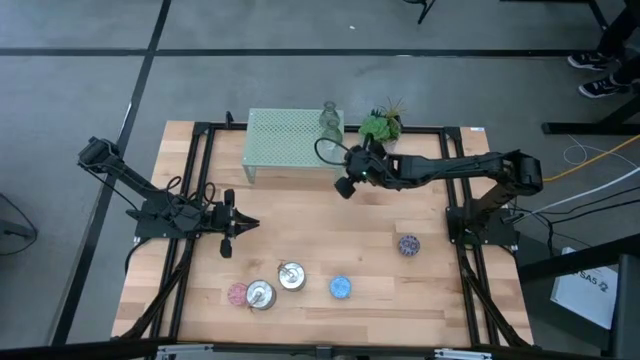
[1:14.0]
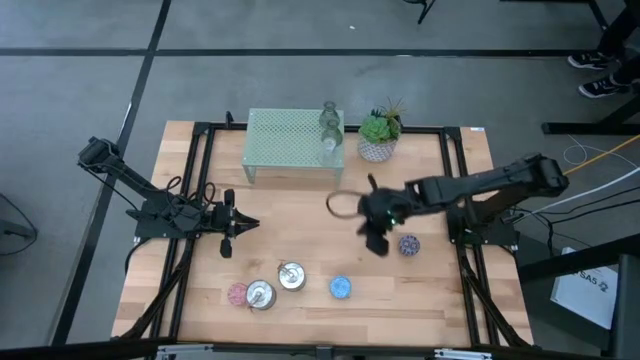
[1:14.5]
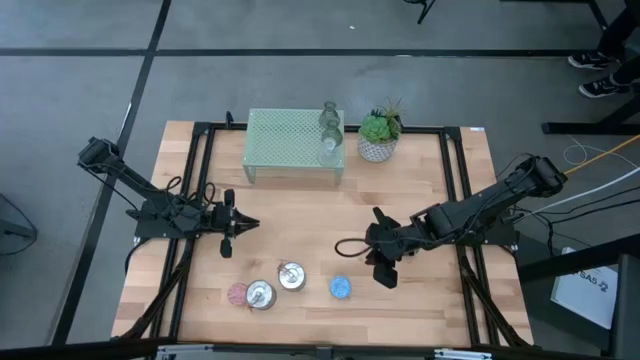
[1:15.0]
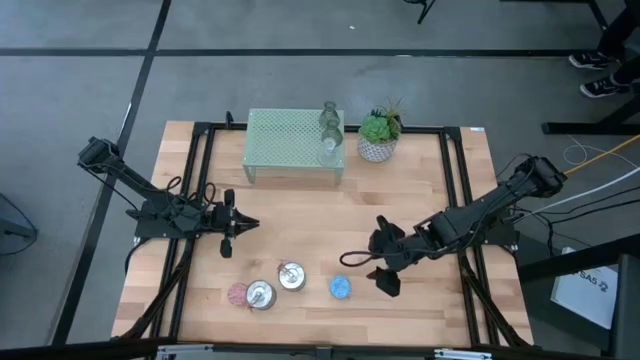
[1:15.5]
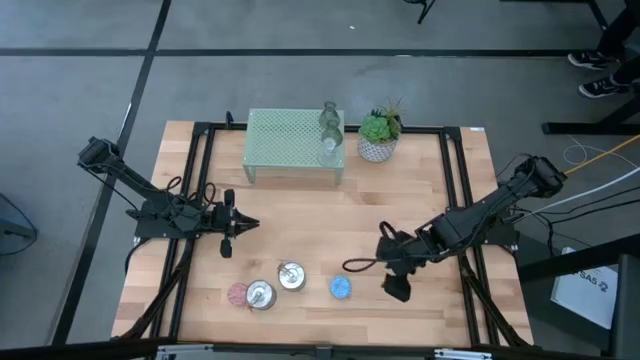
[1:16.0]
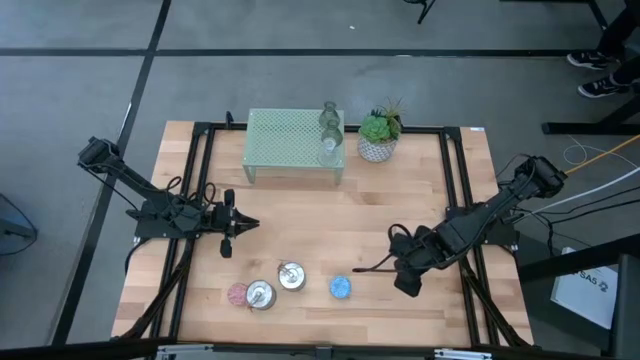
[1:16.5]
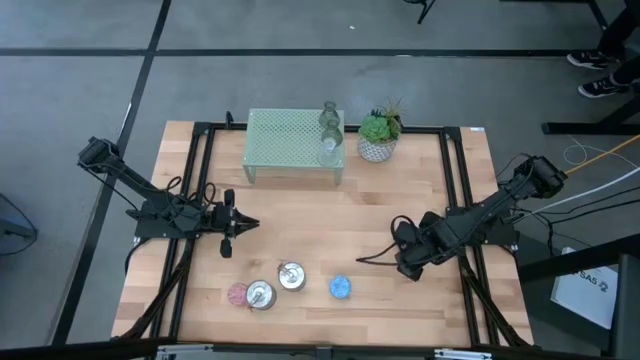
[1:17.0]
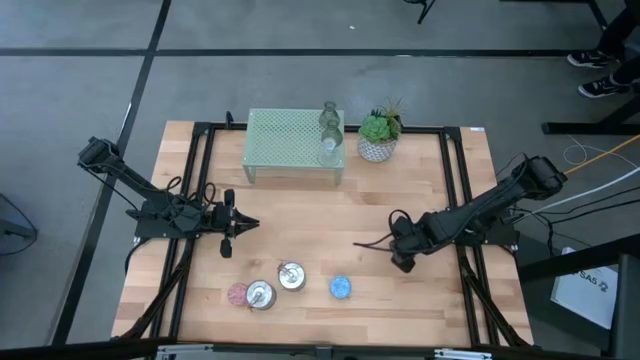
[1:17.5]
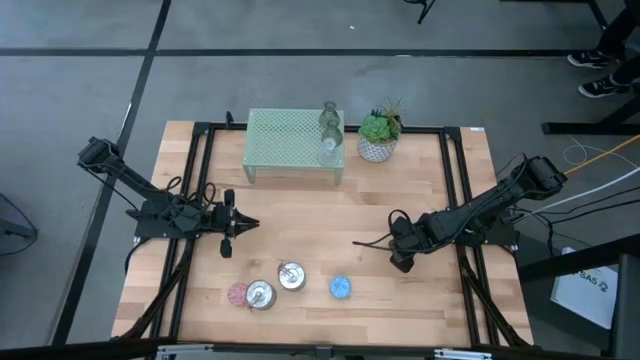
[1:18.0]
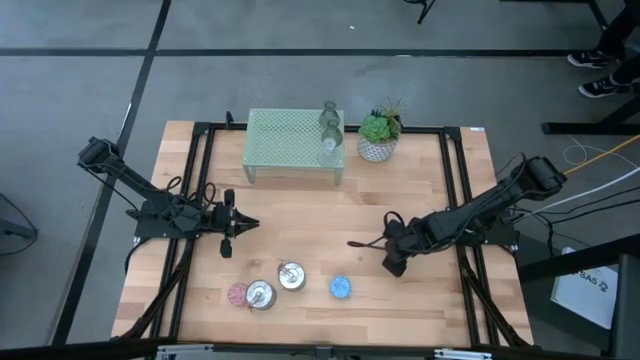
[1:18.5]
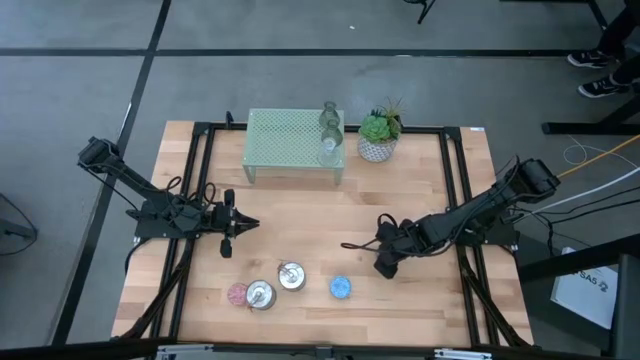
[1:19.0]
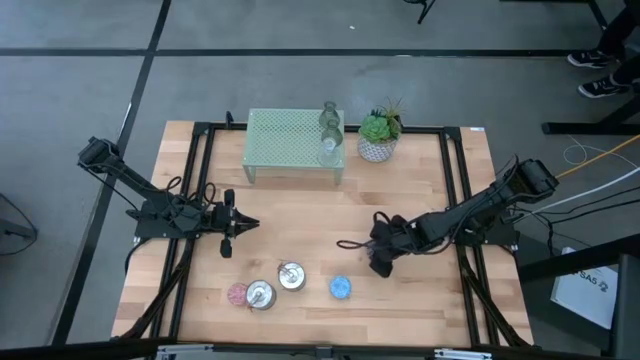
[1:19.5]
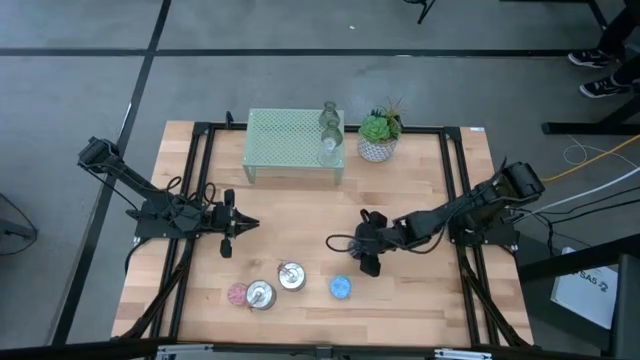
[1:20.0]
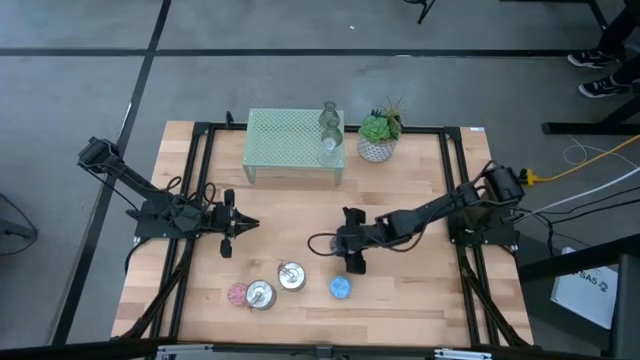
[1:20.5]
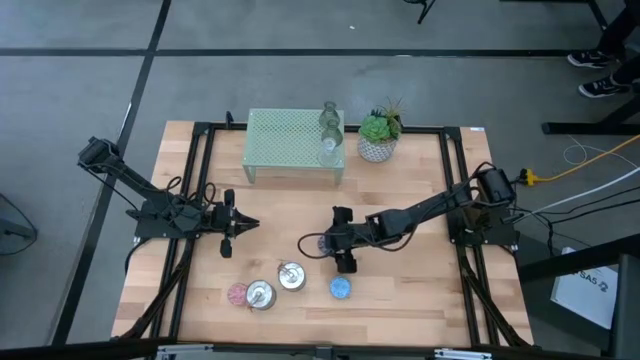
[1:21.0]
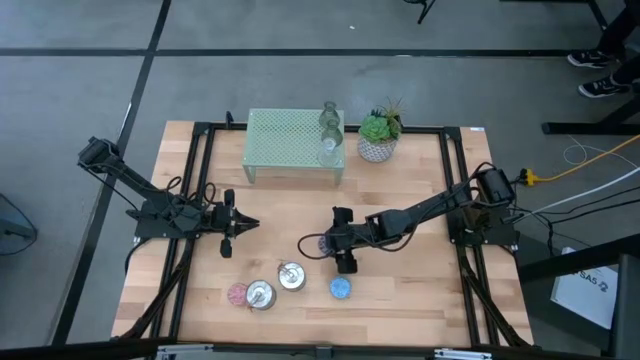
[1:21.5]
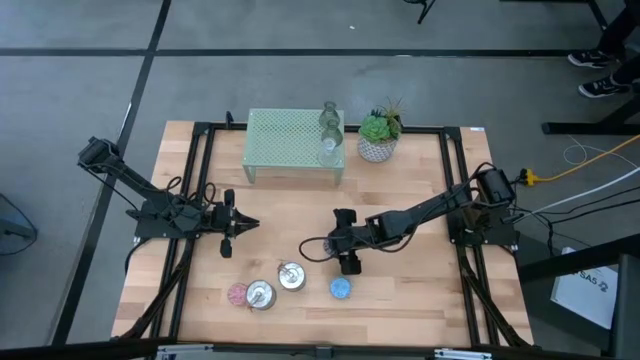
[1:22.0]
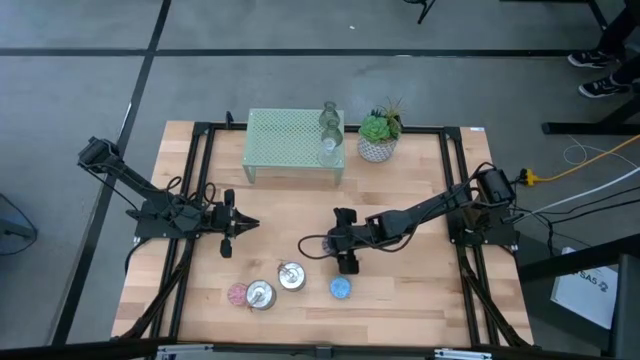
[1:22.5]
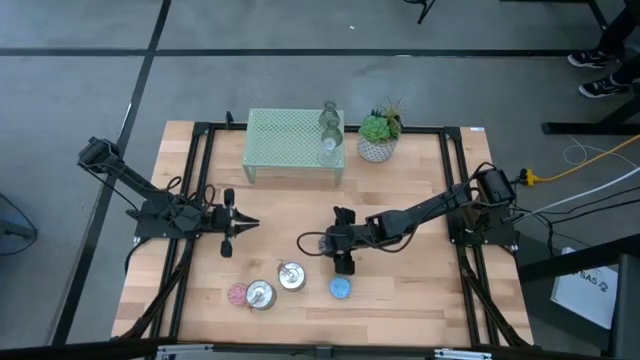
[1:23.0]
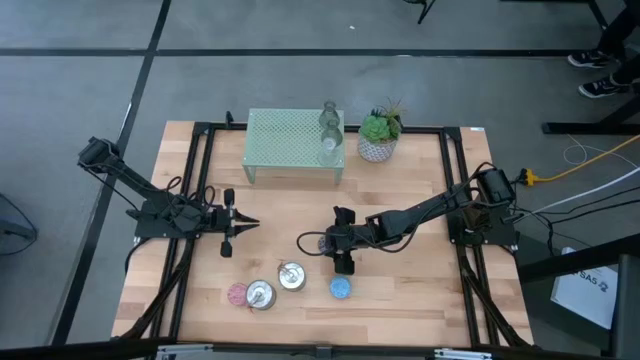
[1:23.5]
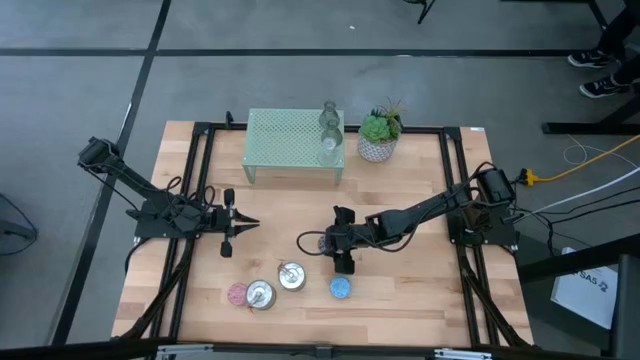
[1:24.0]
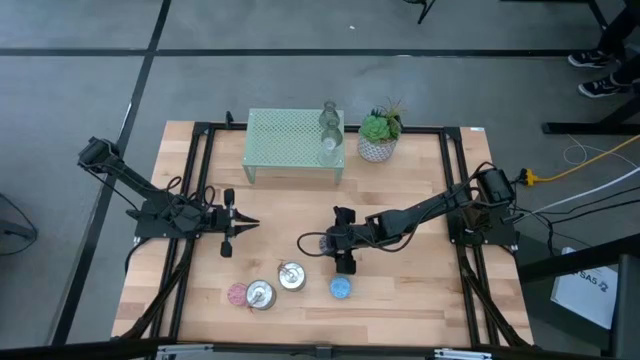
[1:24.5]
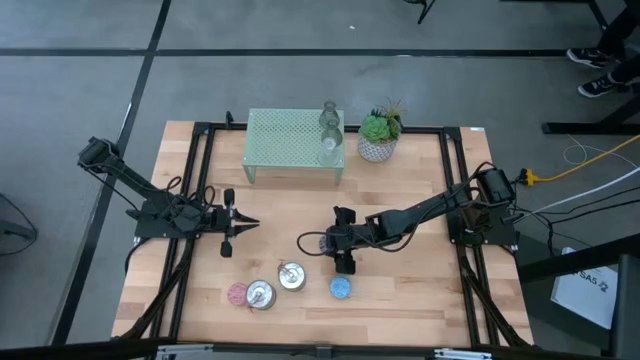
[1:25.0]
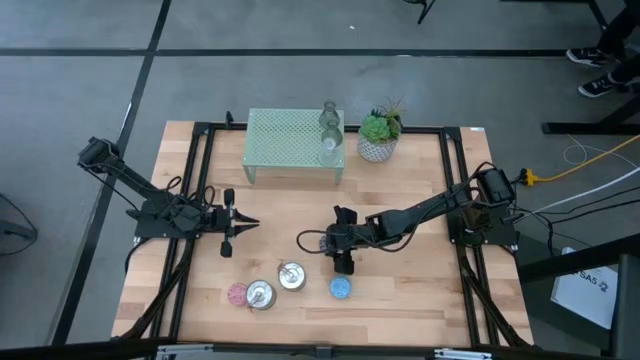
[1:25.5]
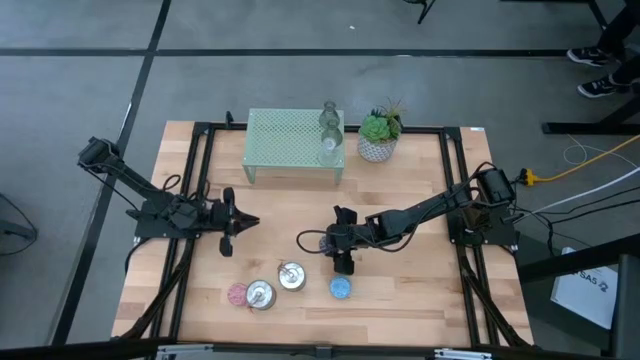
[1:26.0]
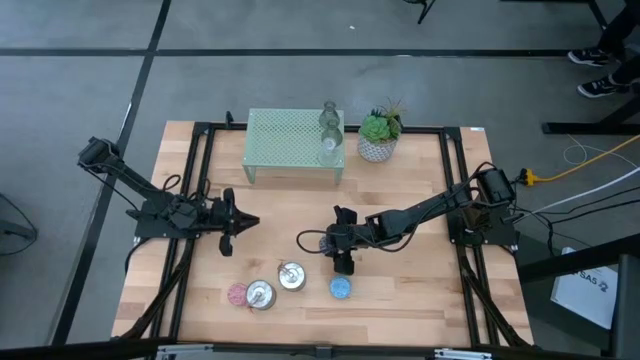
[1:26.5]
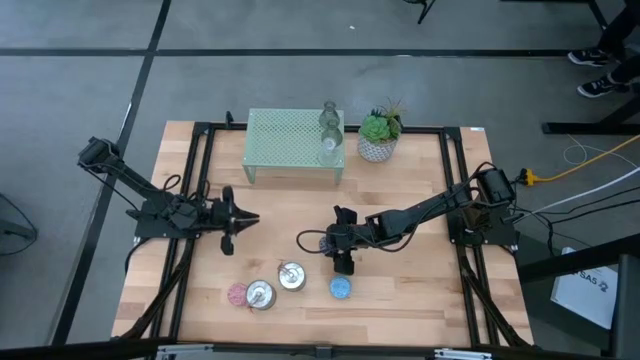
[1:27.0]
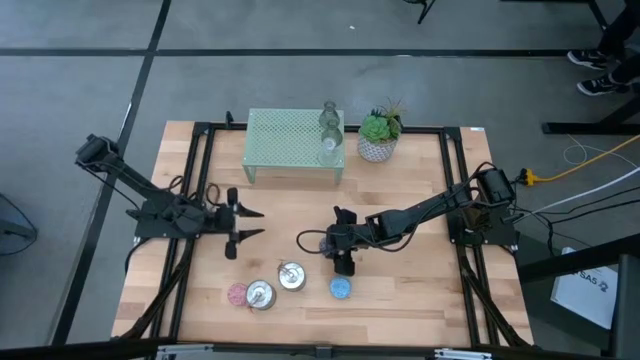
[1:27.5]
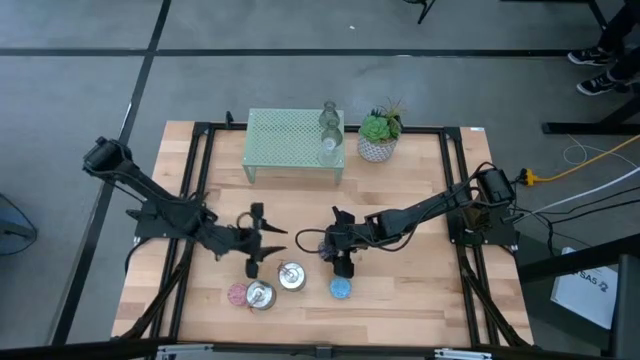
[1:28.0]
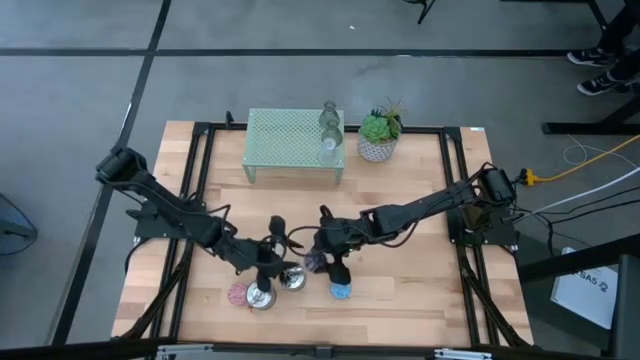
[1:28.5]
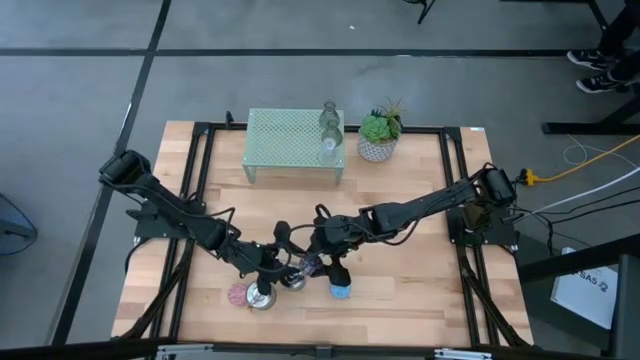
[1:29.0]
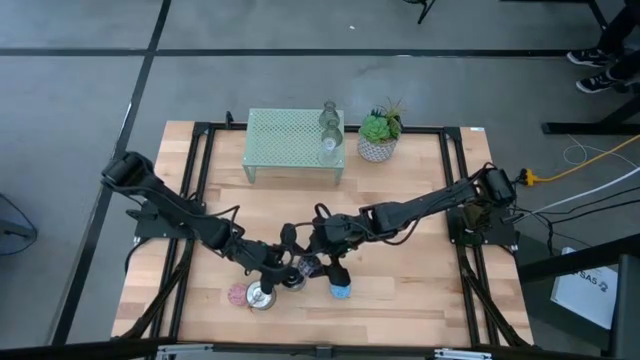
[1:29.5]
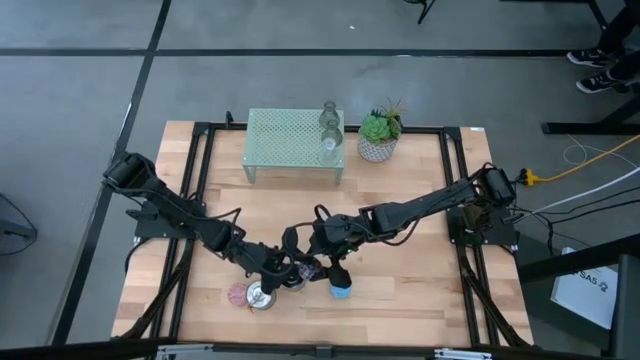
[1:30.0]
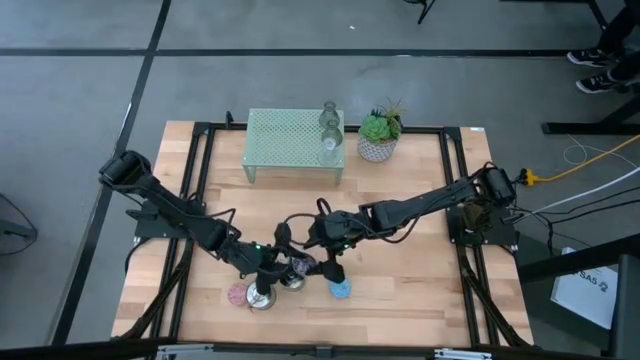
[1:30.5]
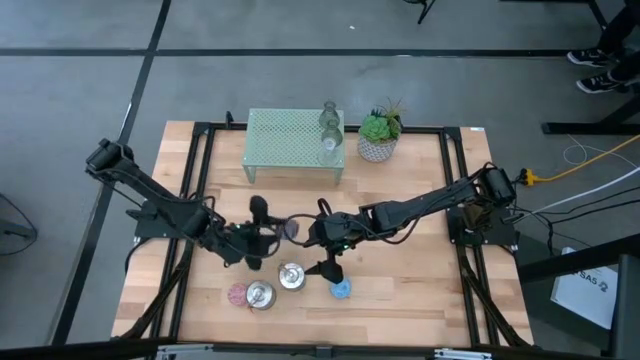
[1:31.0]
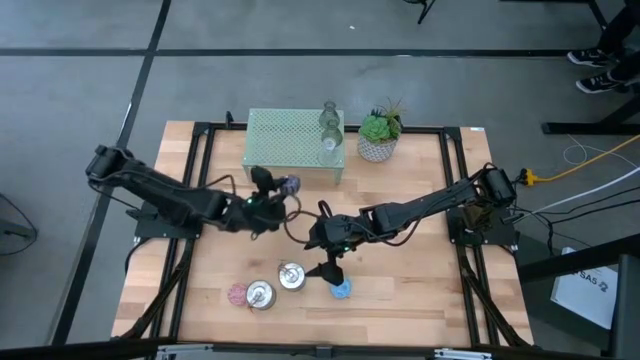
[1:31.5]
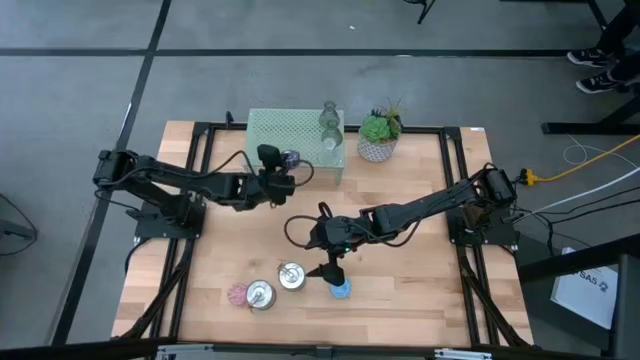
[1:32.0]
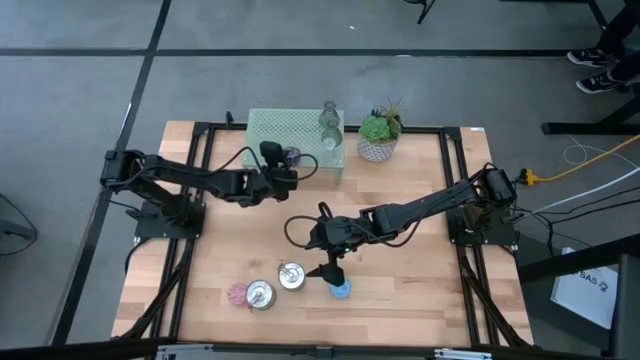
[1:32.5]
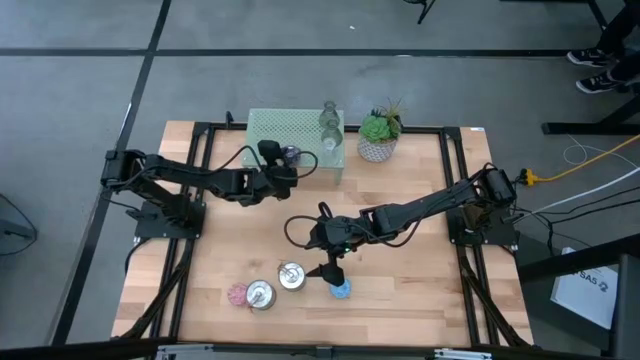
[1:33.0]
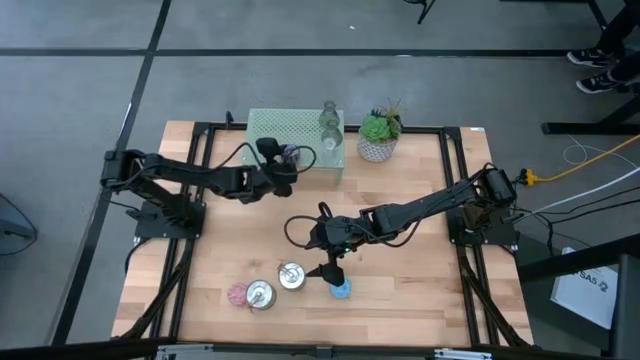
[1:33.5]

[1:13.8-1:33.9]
Task: Pick & Place candle stick holders
Put the black and red candle on the shelf

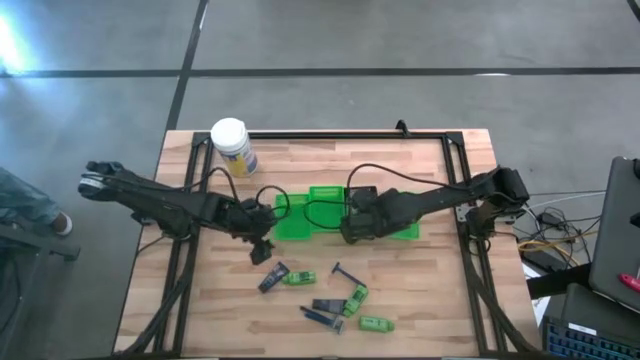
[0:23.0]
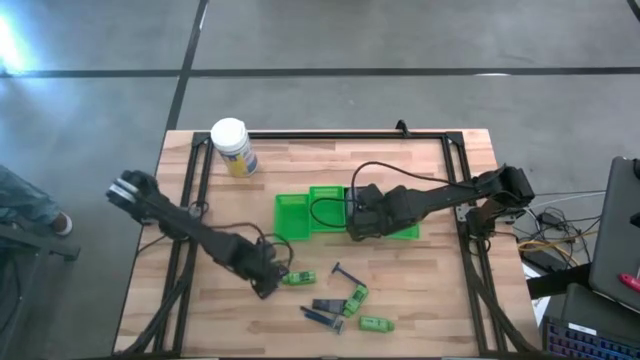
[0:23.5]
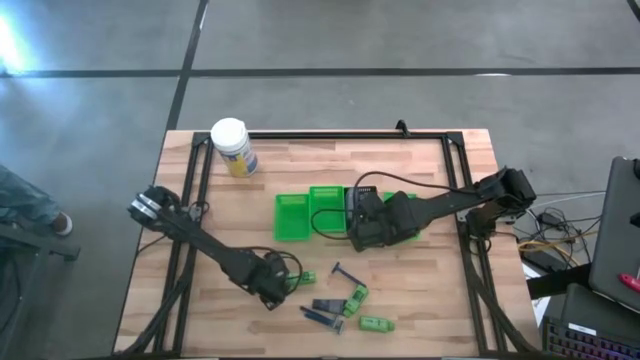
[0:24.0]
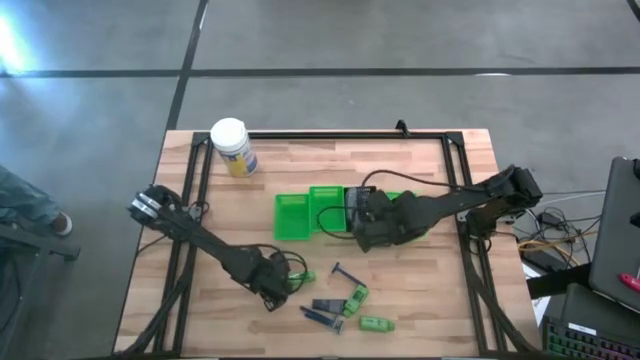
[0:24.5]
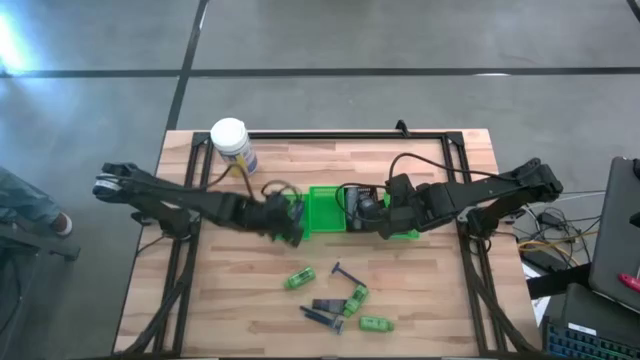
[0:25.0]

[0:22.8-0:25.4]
Task: Pick & Place Travel size toiletries
Put the blue shave butter into the left green bin
